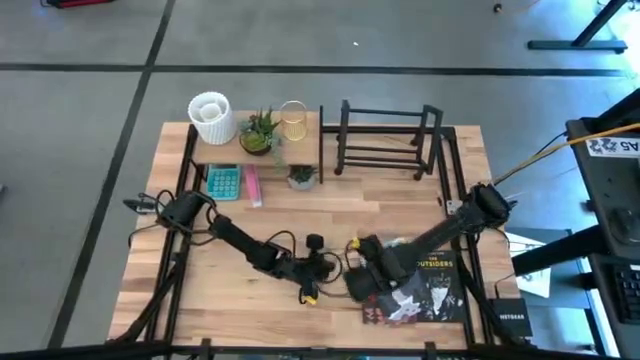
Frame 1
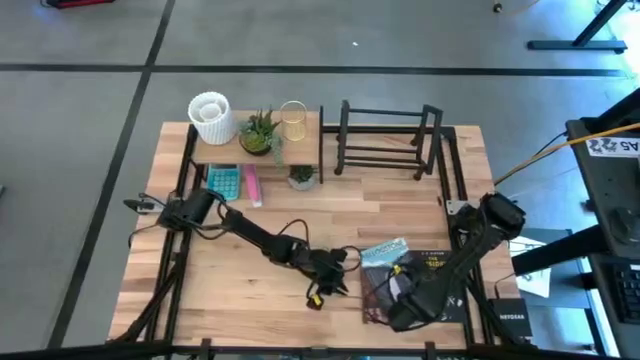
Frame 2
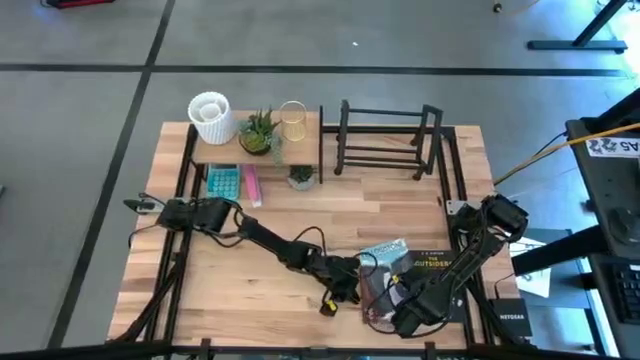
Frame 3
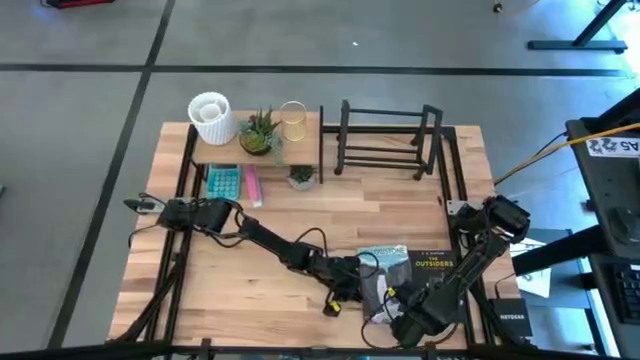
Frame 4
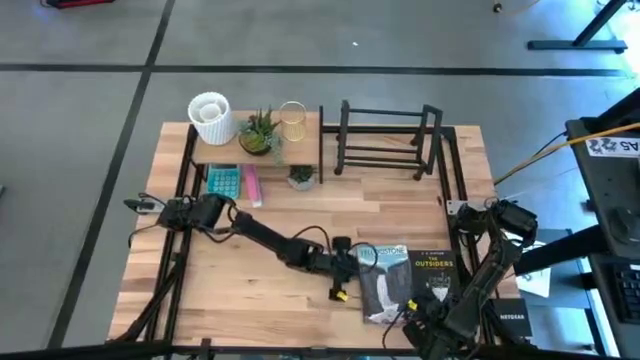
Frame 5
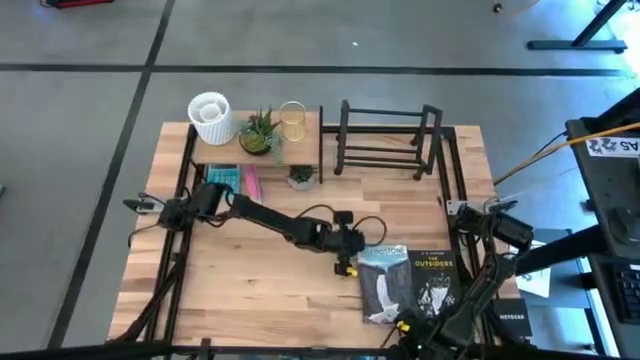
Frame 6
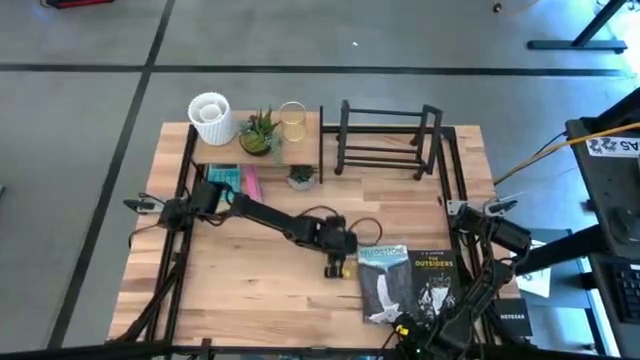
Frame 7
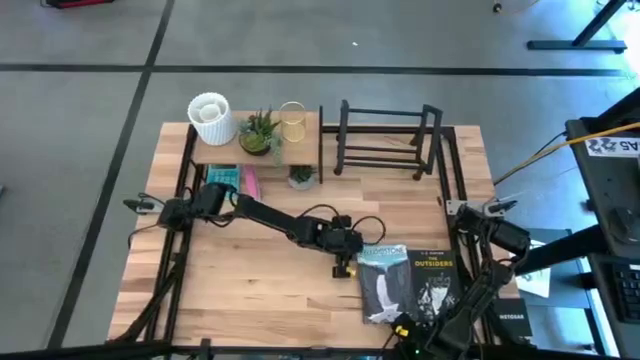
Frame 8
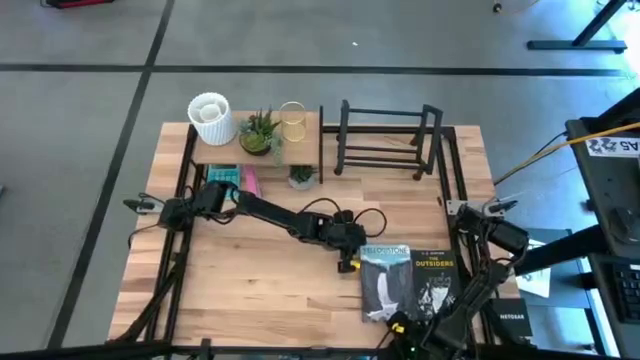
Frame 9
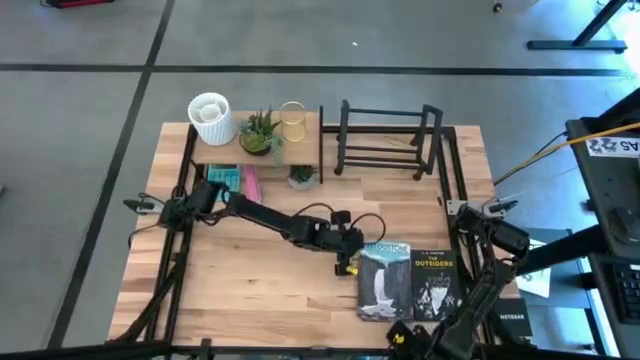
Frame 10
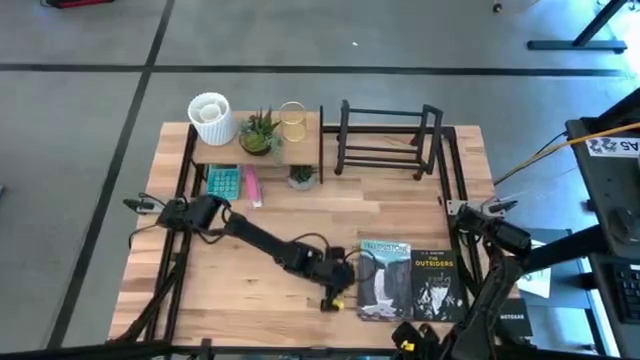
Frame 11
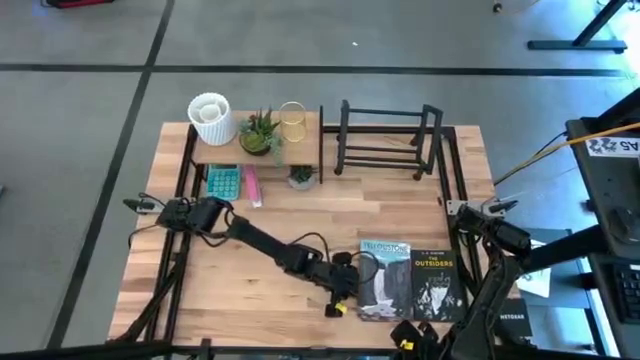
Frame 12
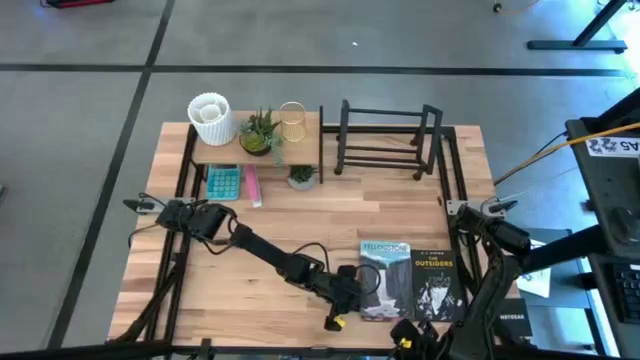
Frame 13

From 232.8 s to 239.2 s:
Task: Stock shelves
Adjust the stacked books from the table

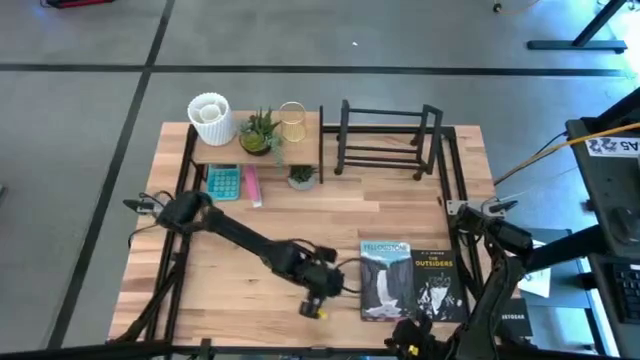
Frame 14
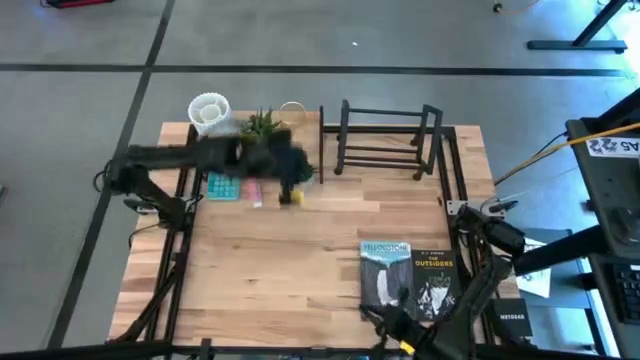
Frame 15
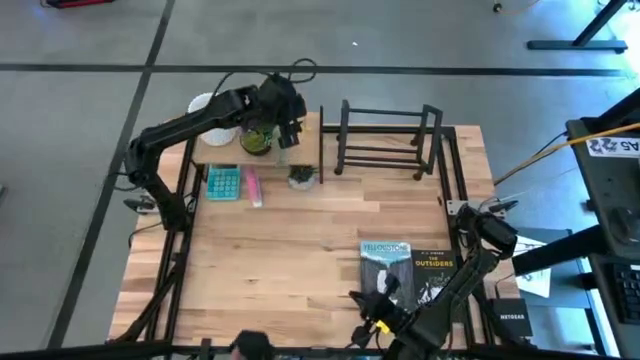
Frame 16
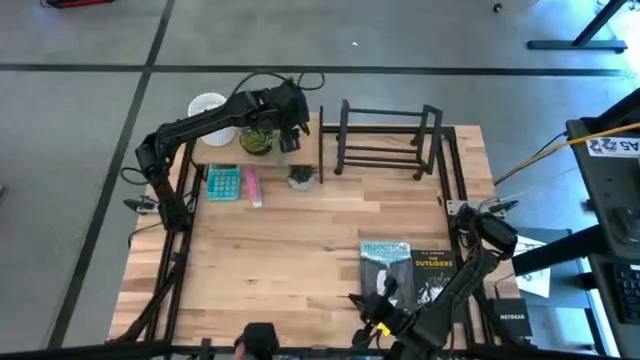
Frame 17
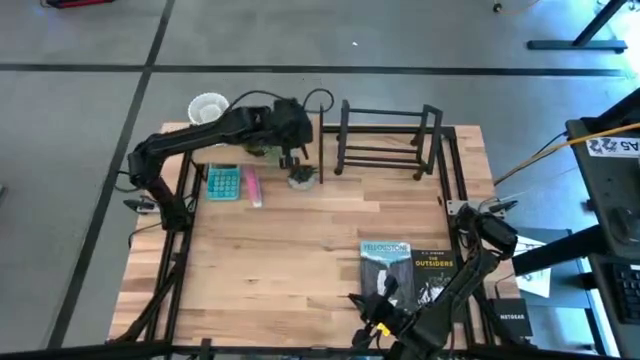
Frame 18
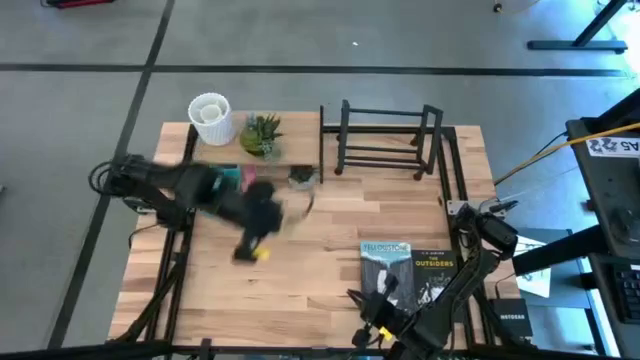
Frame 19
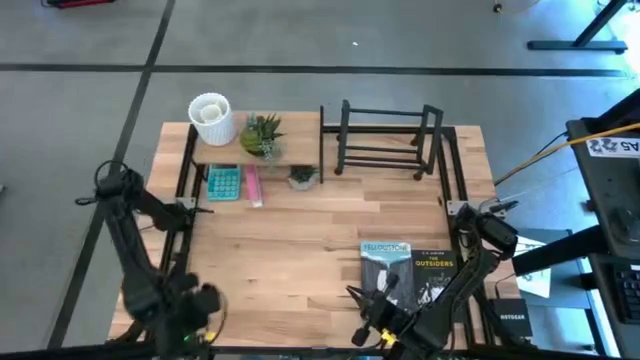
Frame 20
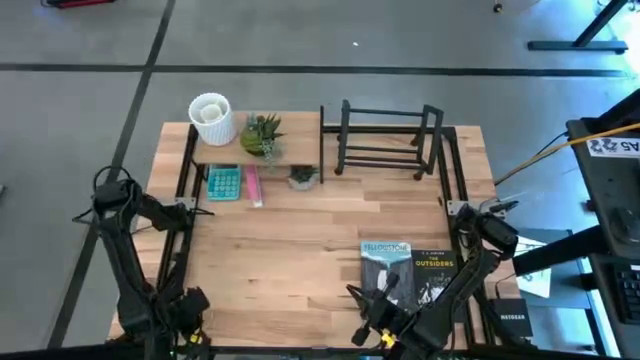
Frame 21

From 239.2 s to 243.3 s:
Remove the gold pen holder from the shelf

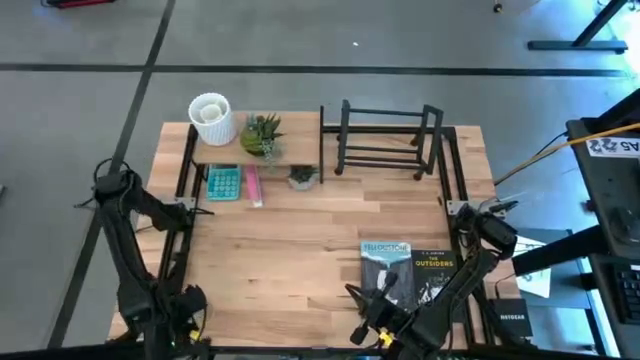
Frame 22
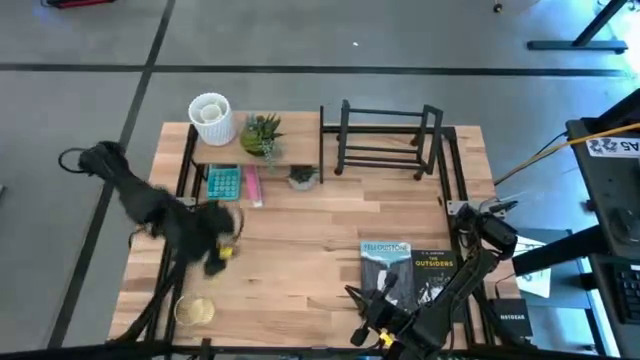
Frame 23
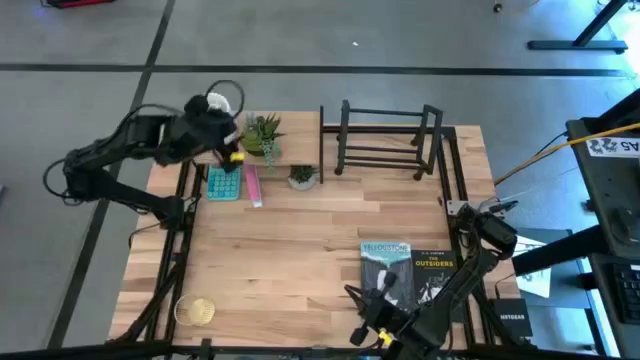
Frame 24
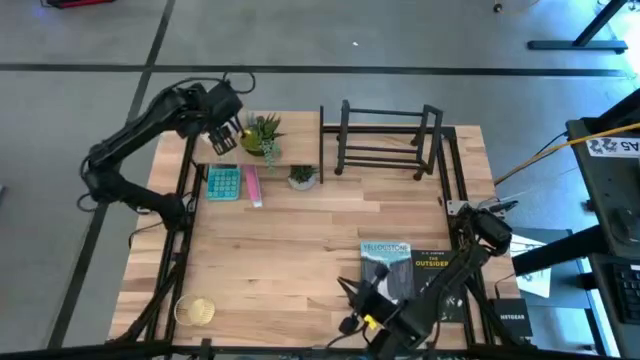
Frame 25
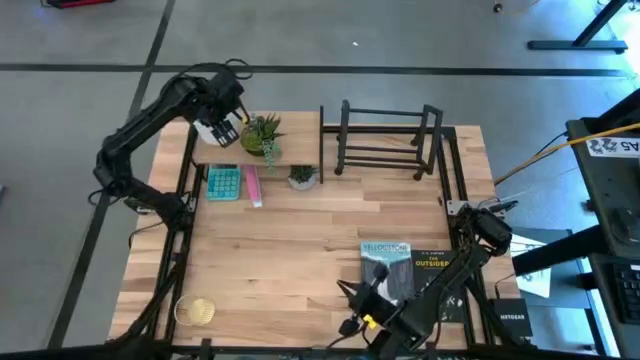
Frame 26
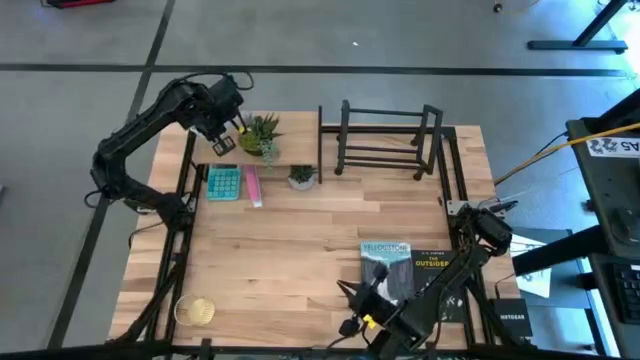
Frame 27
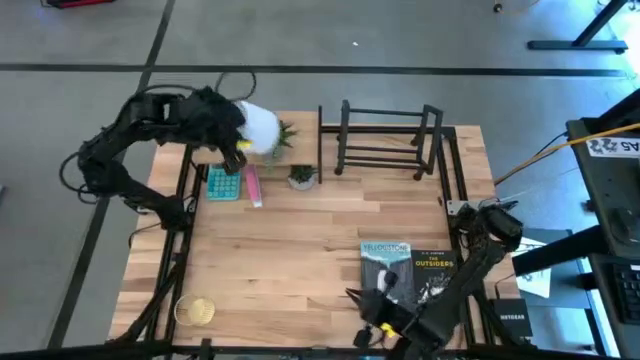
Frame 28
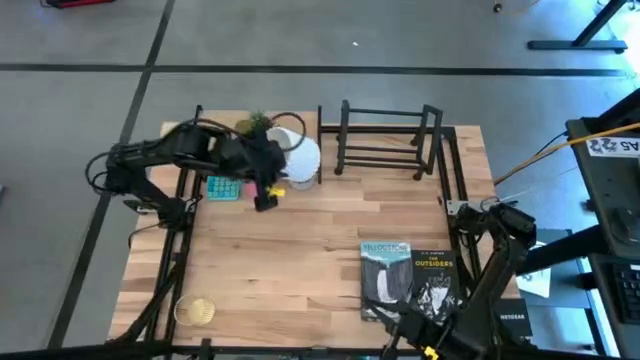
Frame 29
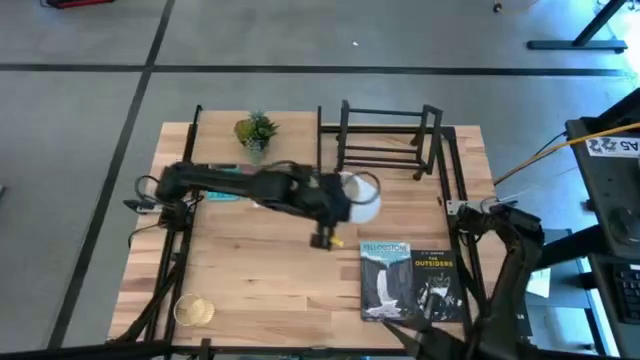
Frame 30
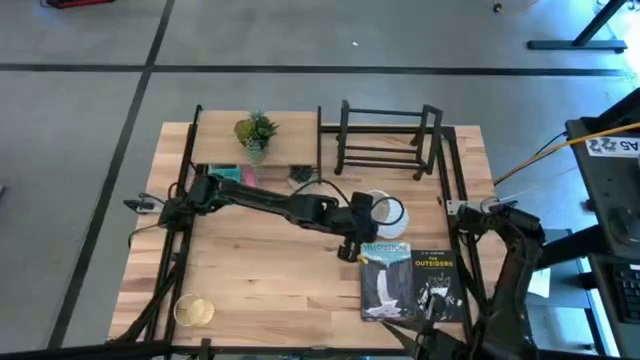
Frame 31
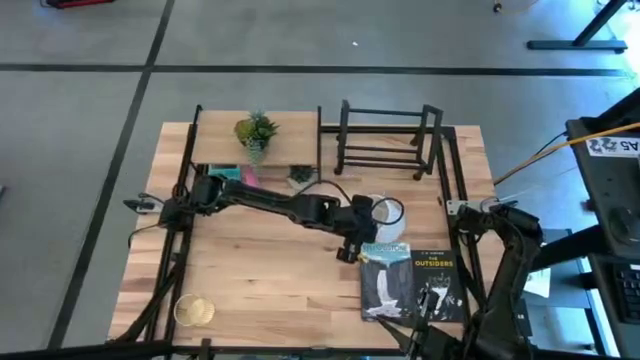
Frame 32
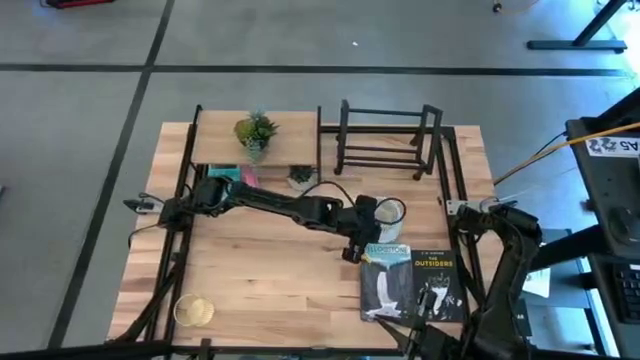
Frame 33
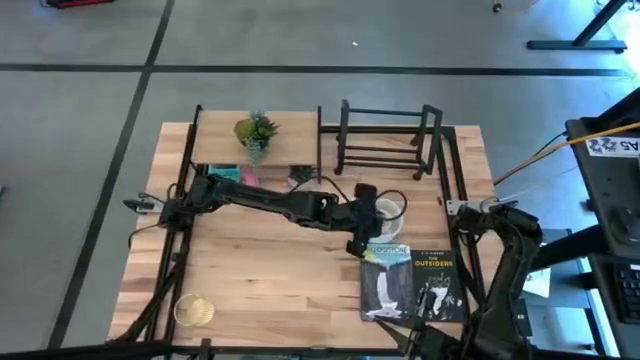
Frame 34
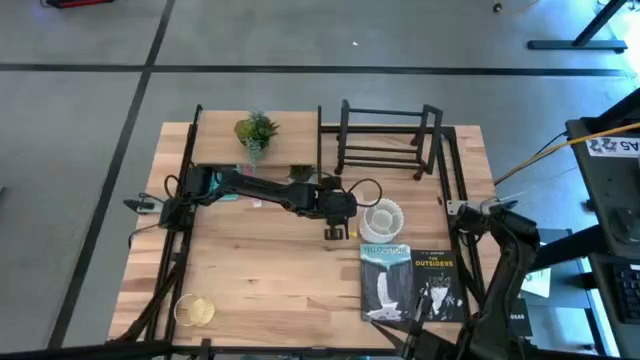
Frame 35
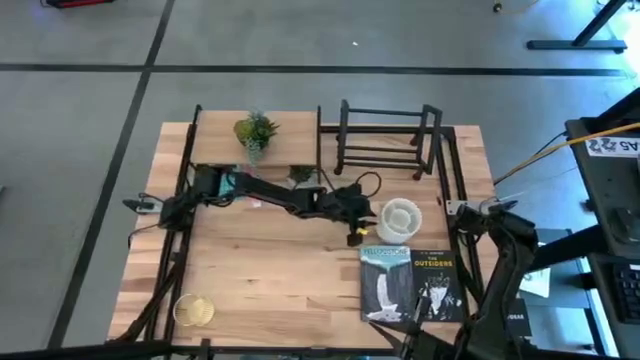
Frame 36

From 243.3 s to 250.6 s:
Remove the white pen holder from the shelf

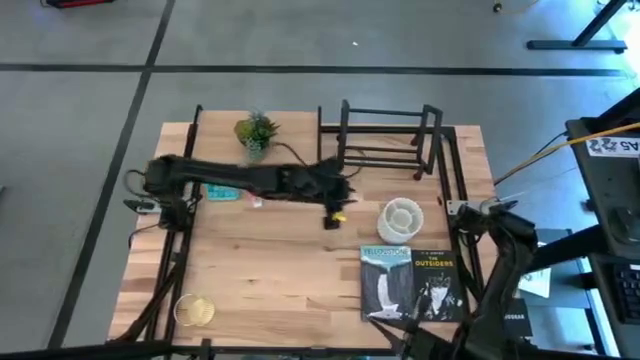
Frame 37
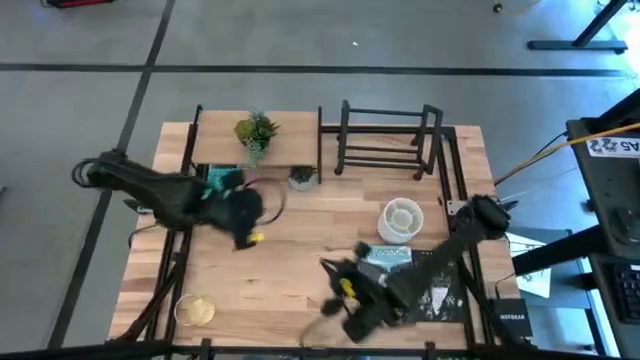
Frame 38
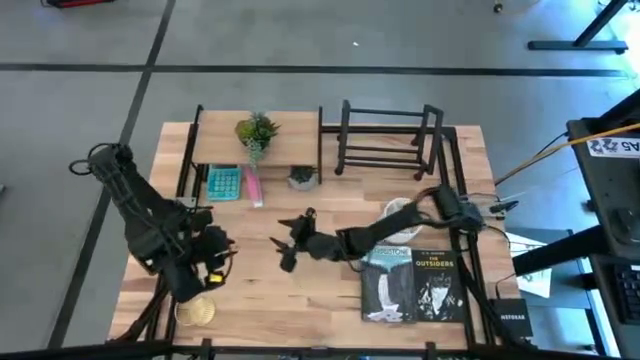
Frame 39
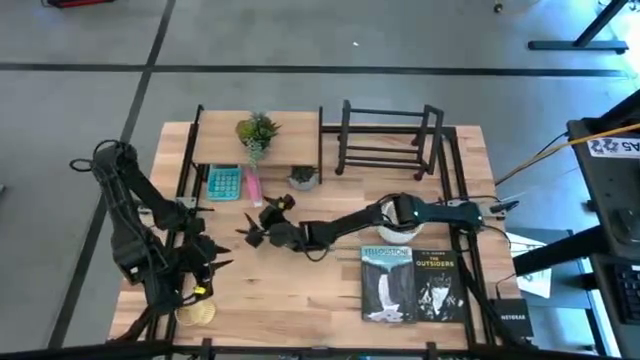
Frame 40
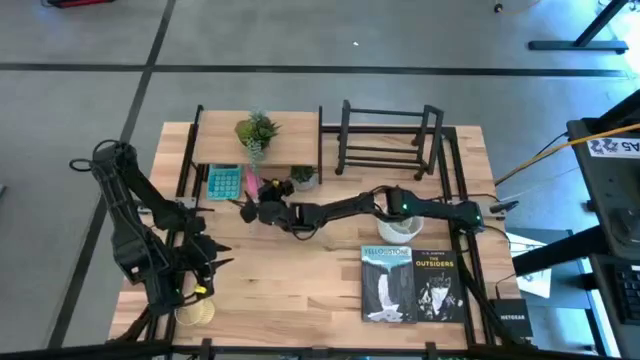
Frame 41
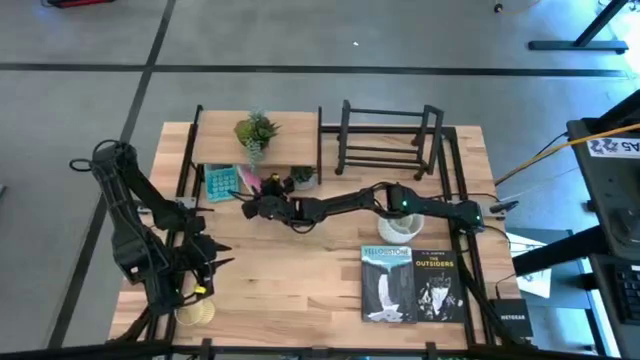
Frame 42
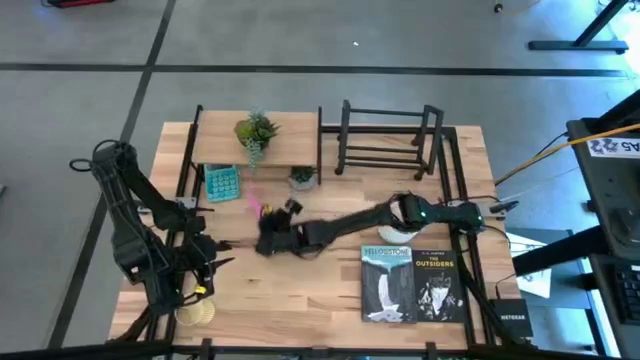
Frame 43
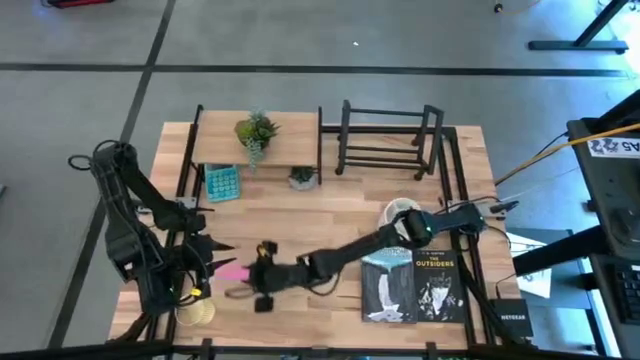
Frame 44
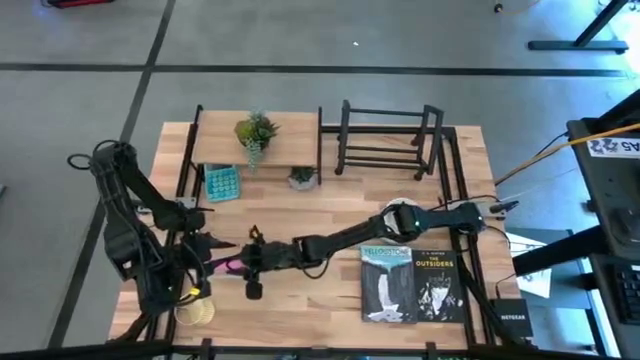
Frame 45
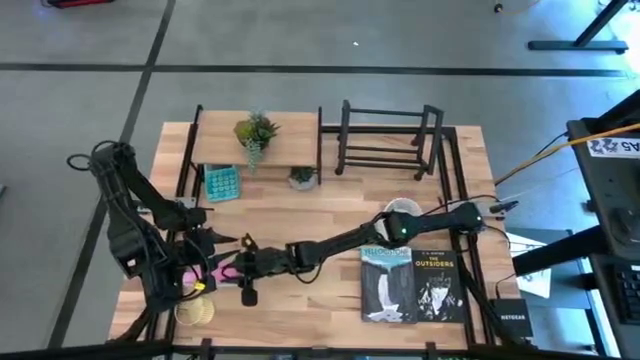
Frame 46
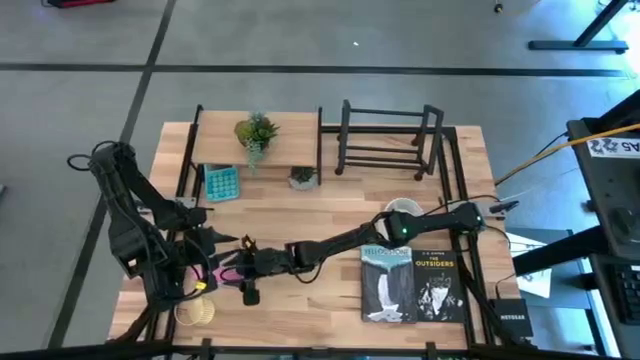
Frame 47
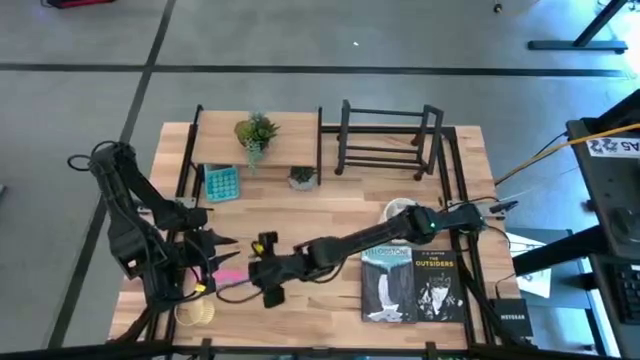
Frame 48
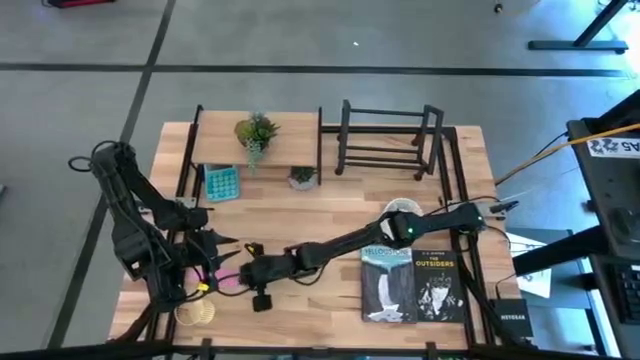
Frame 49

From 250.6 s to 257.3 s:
Move the pink stapler to the bottom left of the table
